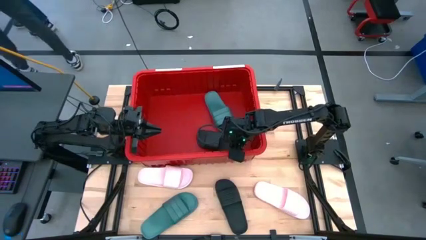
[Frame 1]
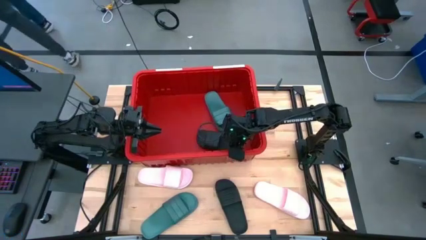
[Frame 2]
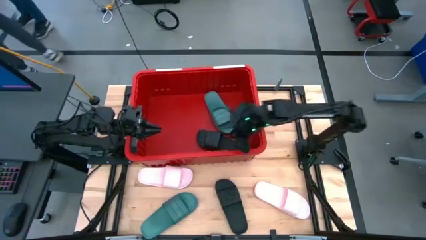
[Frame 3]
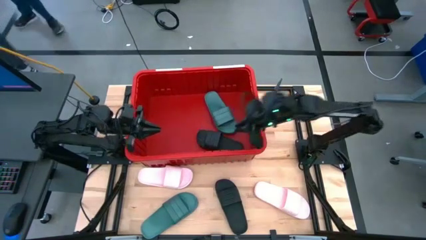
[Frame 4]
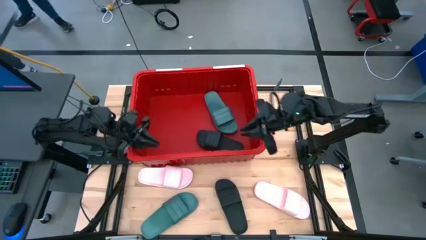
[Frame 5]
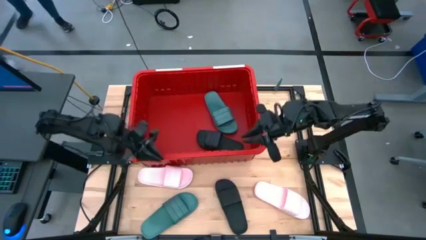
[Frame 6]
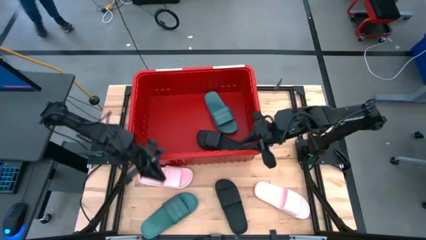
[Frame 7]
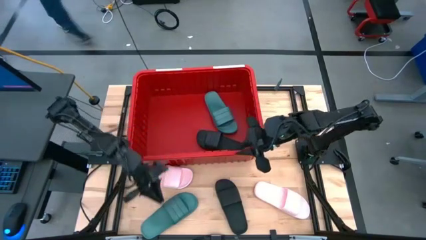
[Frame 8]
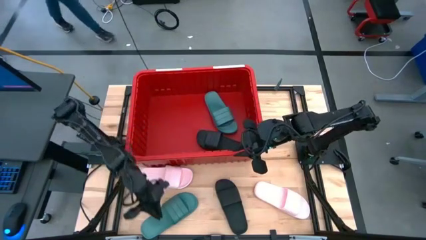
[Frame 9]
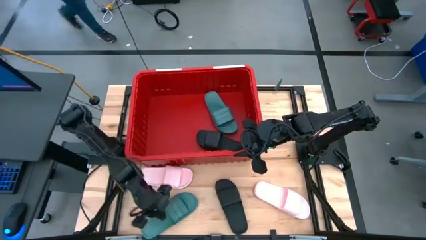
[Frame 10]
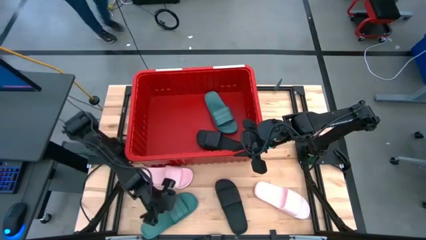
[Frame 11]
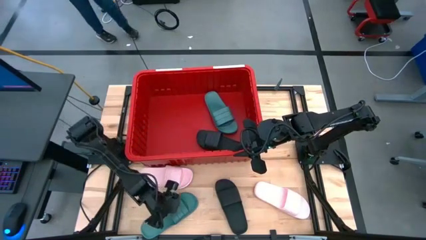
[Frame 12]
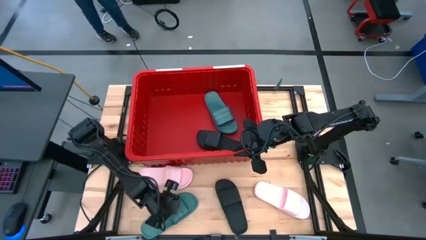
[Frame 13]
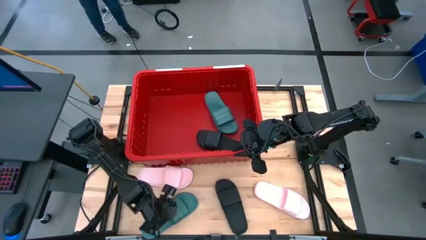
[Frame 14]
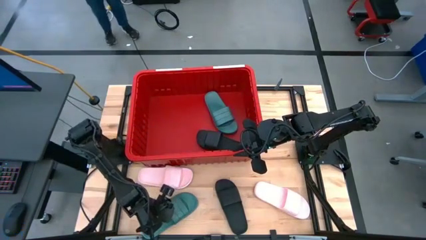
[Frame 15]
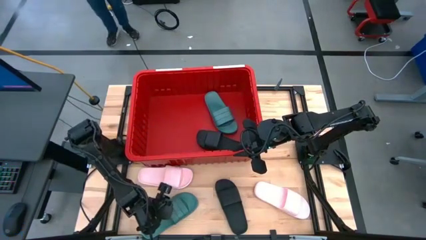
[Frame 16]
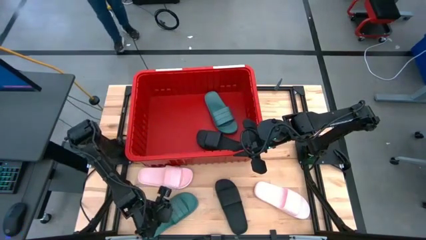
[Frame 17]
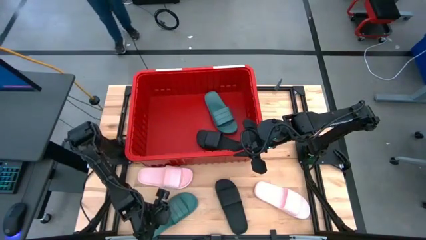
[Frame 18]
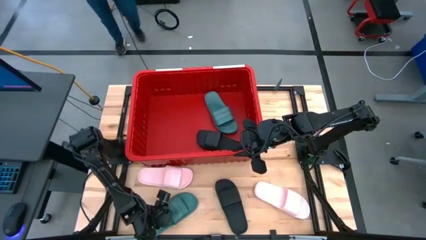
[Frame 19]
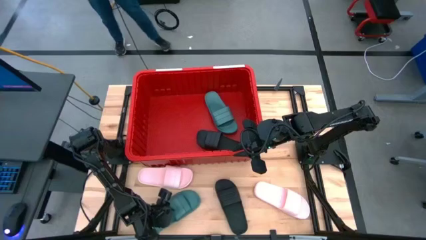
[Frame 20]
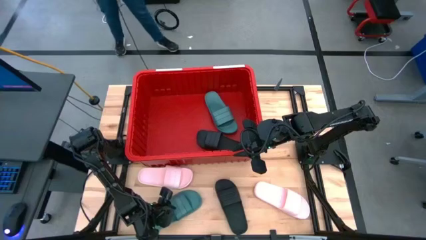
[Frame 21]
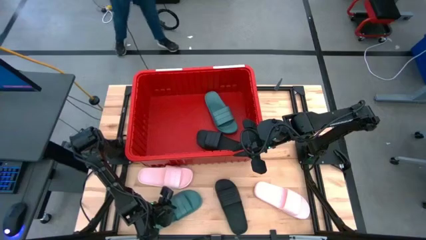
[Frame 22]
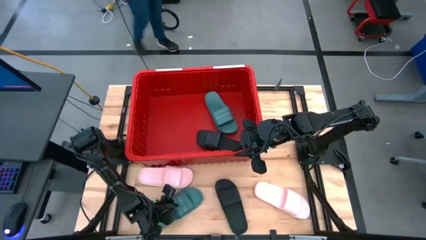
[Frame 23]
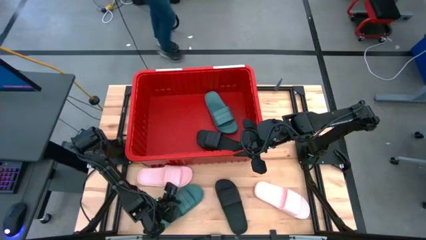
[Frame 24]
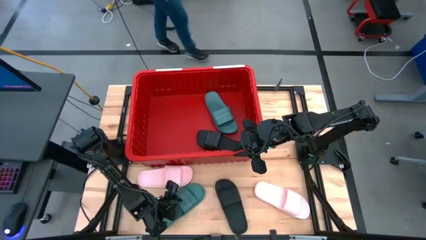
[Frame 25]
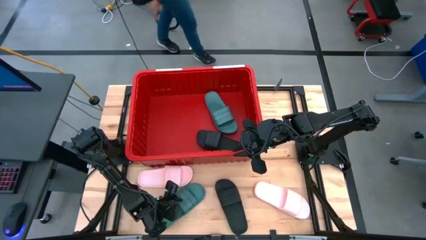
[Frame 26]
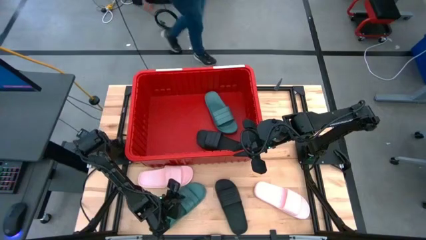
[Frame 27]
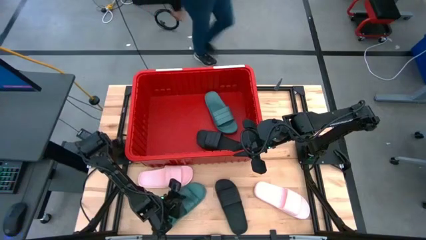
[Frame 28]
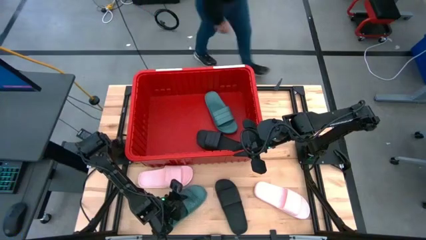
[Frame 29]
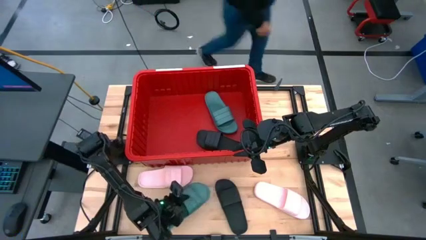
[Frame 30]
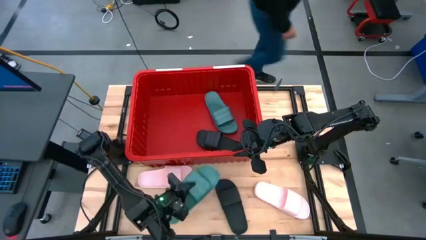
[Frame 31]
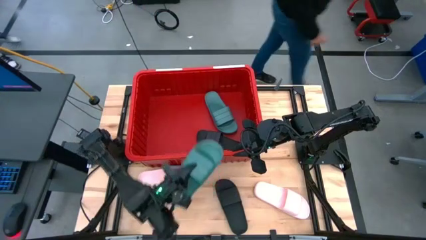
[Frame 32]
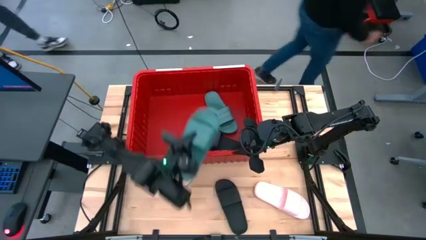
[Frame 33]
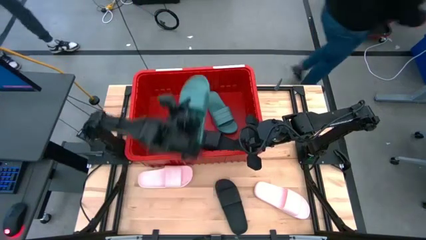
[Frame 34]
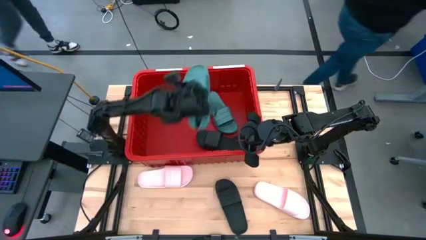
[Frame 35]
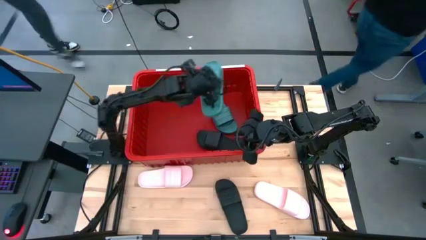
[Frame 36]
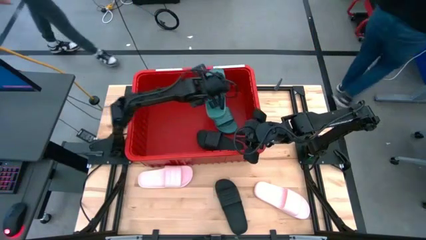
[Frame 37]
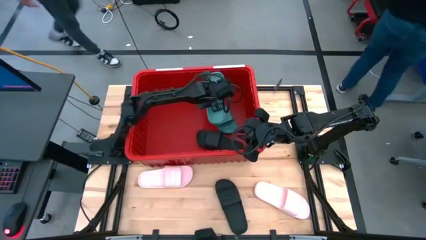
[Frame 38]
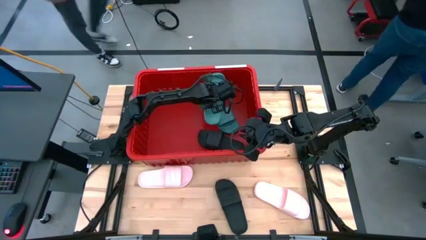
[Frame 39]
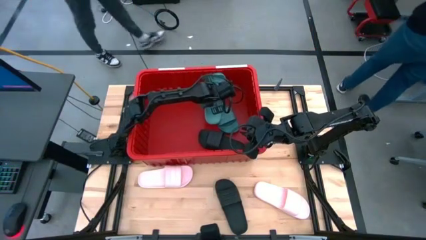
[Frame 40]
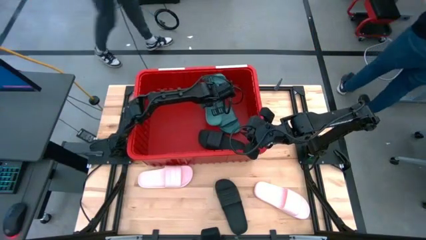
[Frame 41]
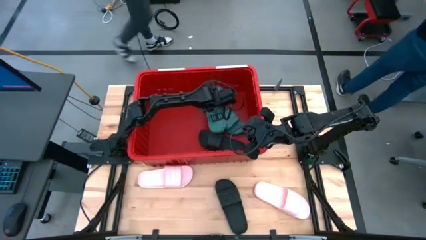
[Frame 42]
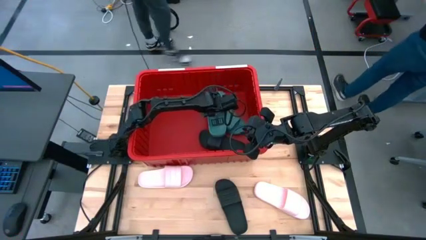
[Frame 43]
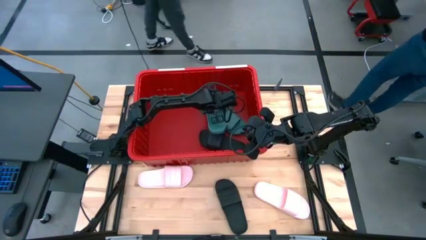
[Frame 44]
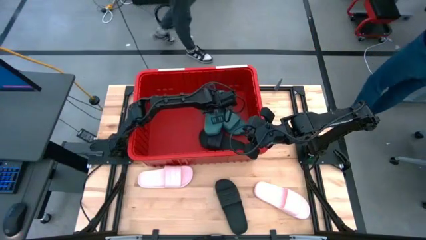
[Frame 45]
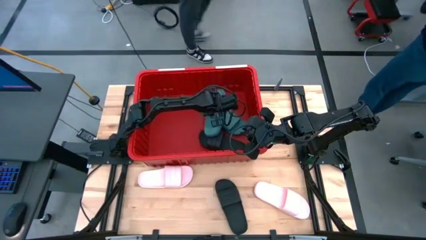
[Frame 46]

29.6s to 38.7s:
Task: Pick and place slides into bin
Put the green slide into the red bin

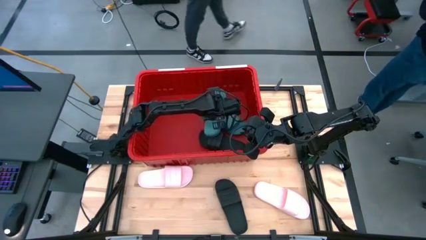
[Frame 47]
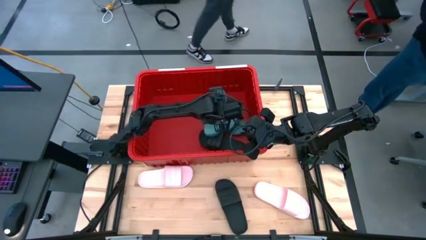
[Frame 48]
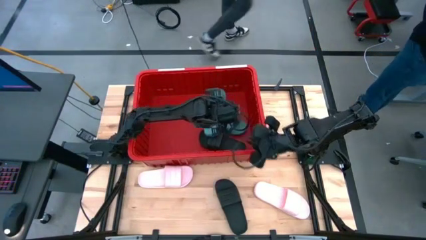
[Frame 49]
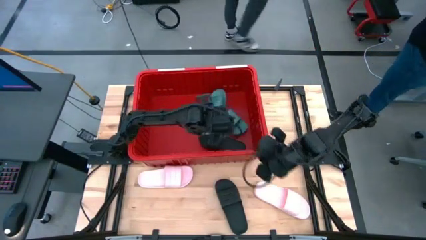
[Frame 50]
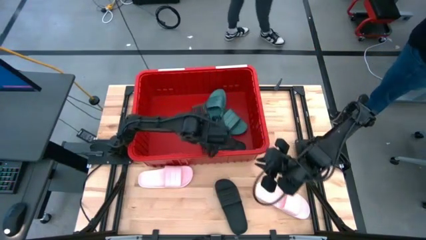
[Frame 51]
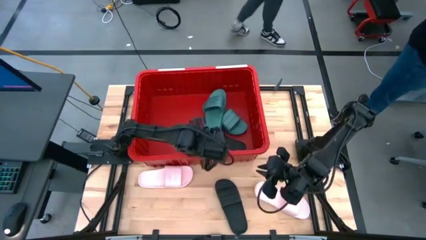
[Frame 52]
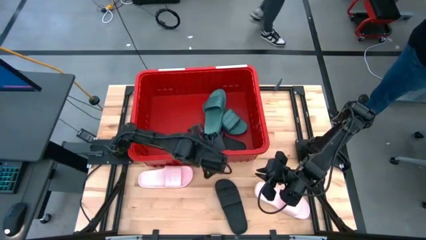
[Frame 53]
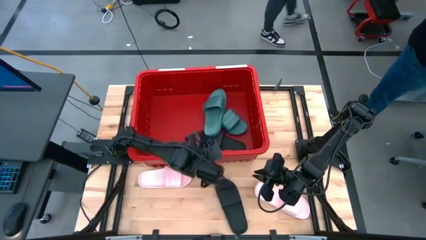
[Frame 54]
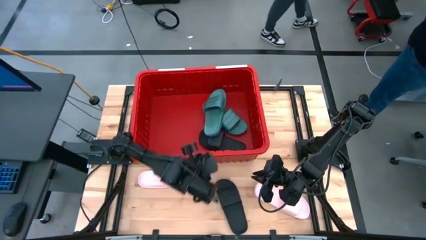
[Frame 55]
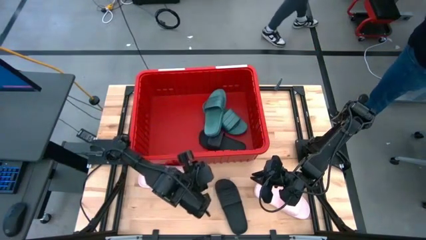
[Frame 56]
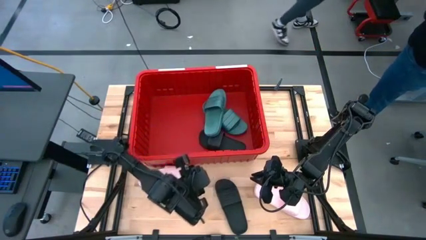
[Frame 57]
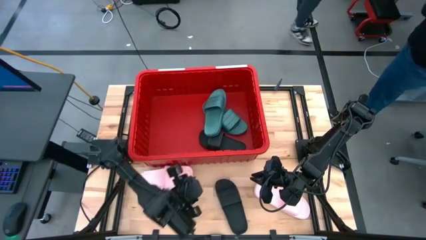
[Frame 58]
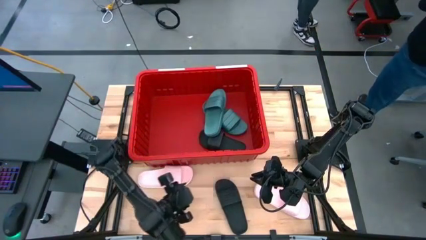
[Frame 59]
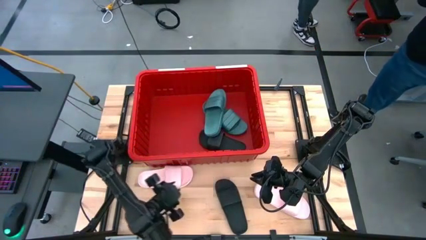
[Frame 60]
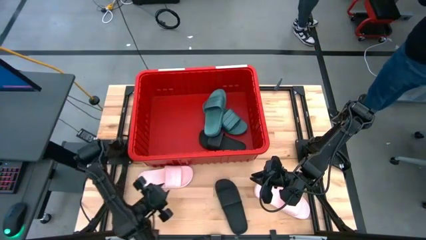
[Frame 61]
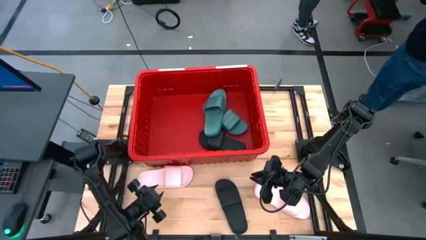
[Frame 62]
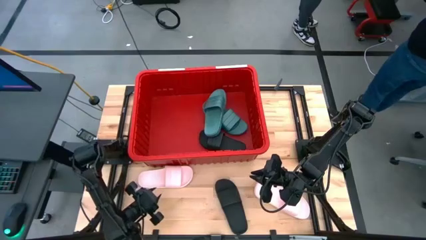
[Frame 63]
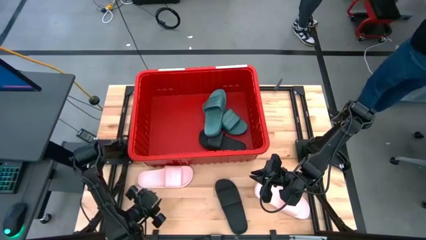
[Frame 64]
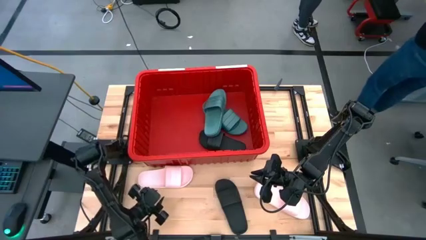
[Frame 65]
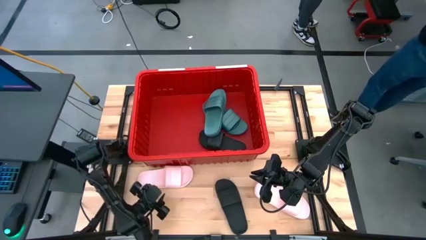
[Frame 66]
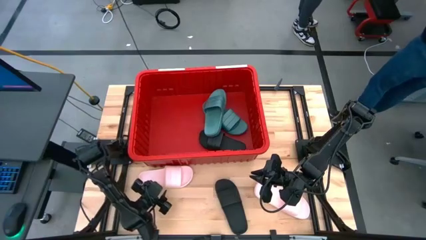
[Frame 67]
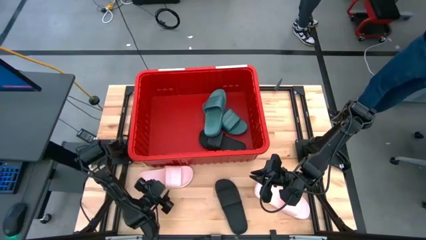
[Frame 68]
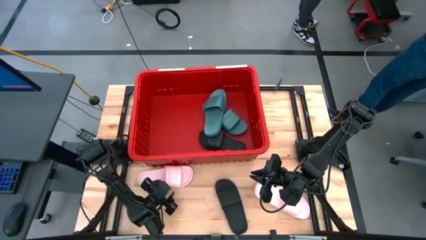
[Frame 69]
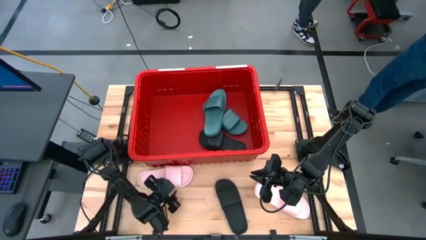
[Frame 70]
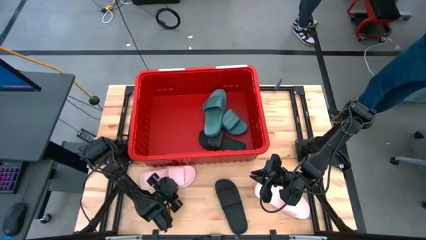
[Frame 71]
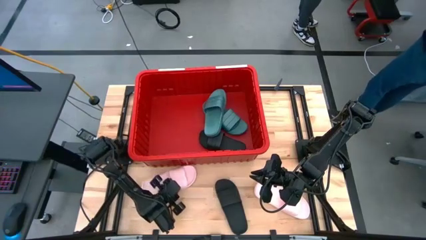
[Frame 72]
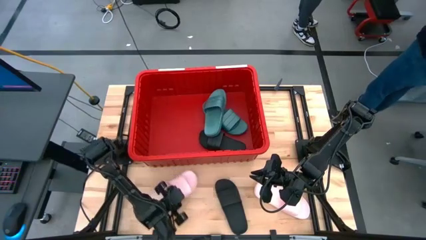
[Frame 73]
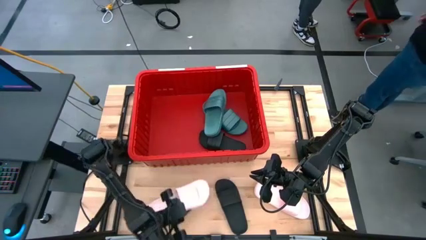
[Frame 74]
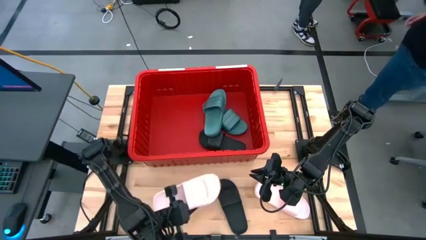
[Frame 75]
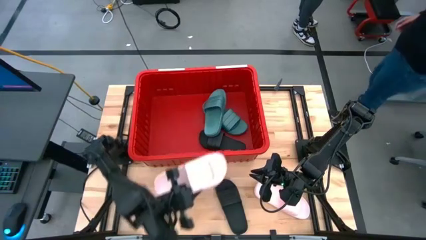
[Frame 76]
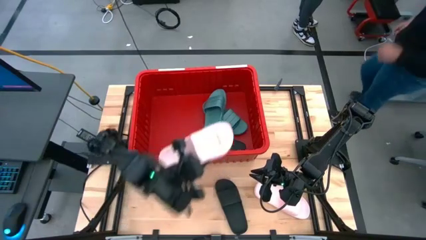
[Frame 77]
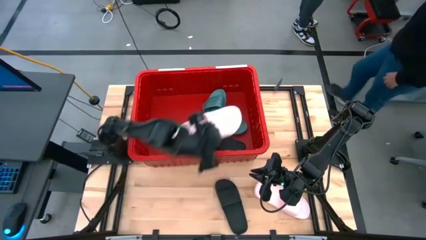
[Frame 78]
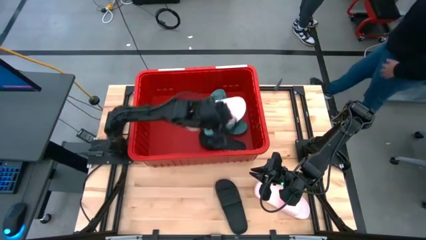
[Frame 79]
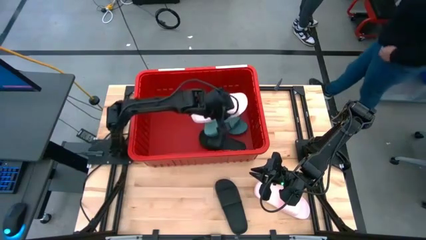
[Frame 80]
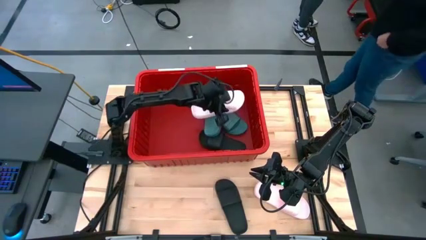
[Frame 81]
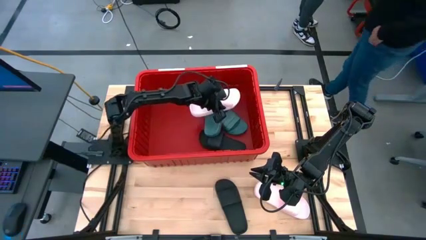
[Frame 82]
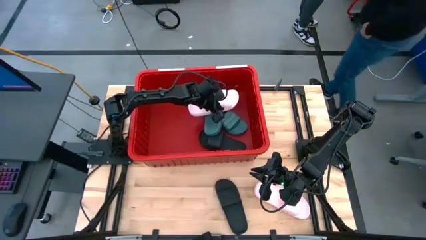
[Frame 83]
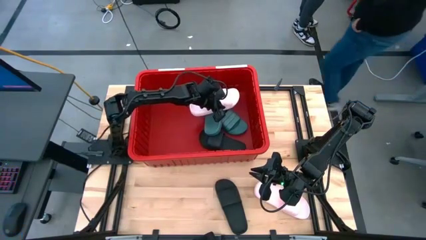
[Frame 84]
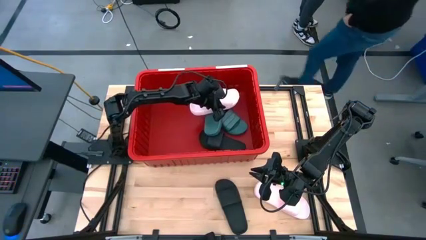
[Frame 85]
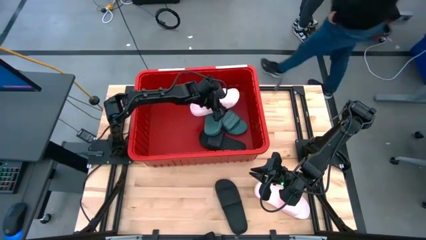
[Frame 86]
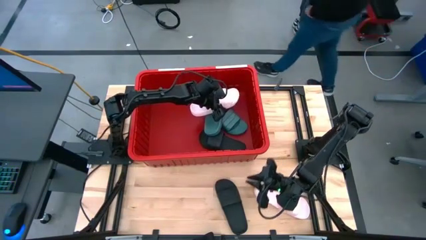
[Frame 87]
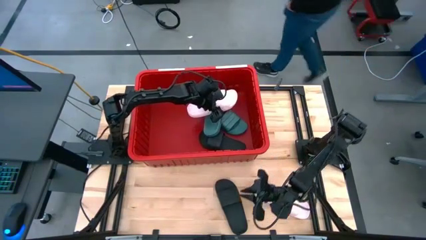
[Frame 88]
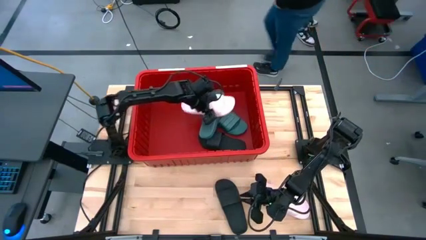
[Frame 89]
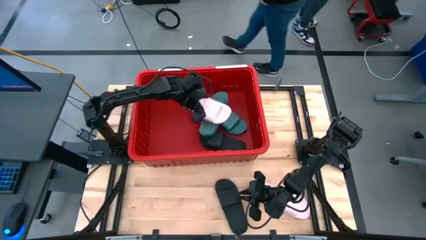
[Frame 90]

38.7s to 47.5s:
Put the left pink slide into the red bin
